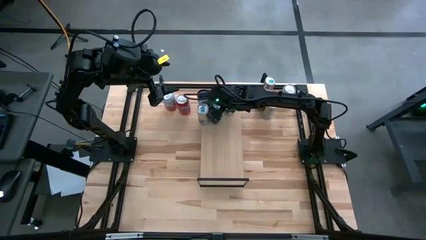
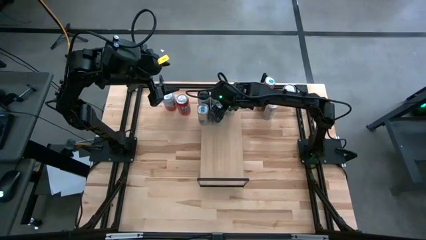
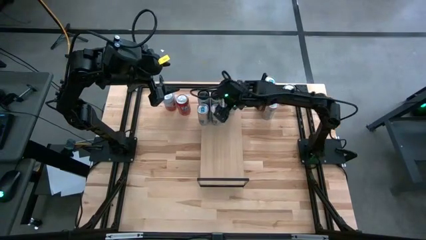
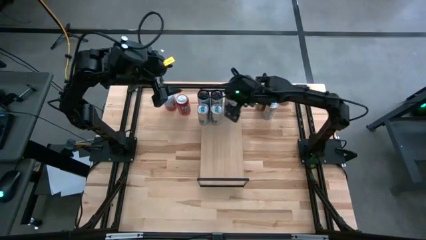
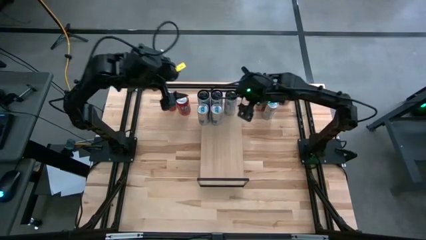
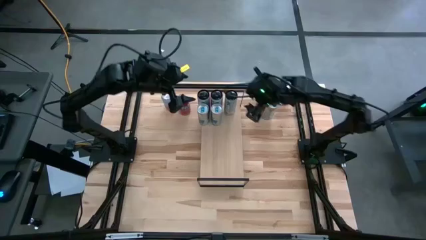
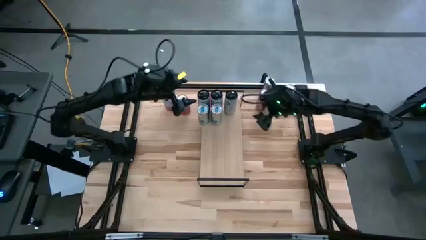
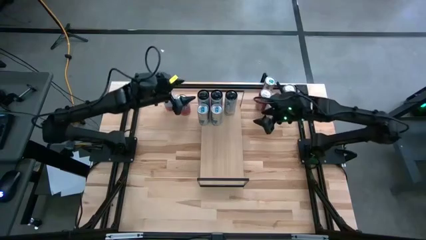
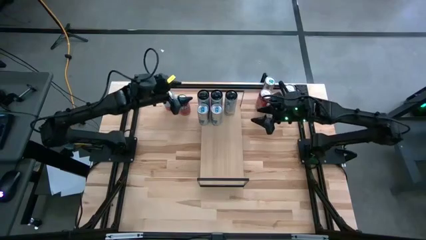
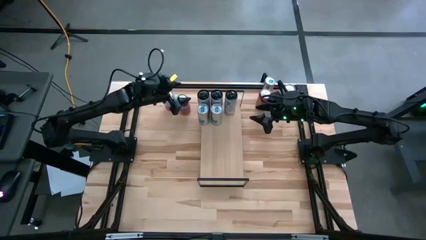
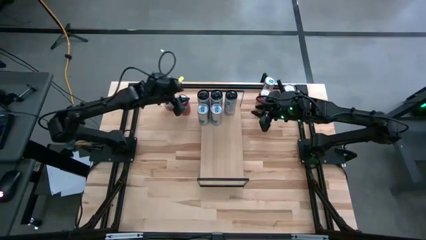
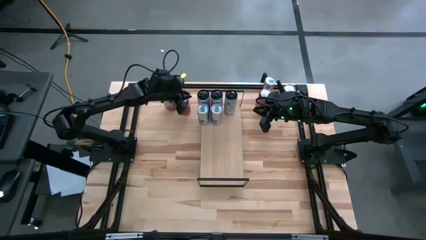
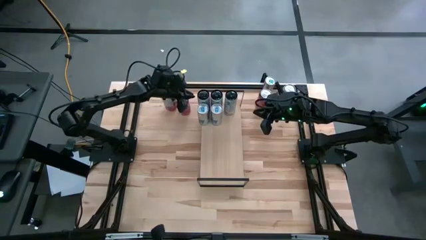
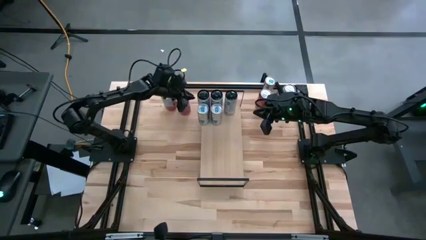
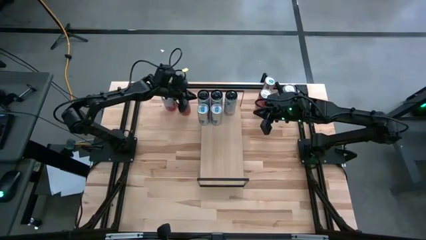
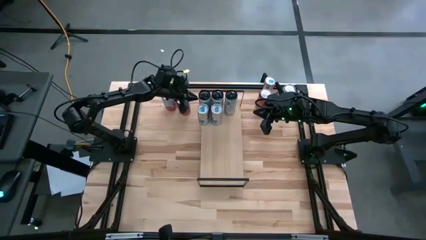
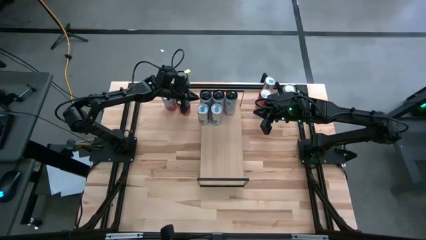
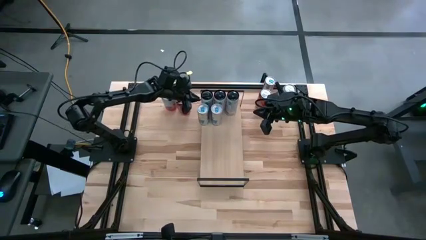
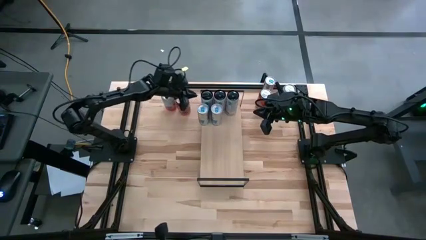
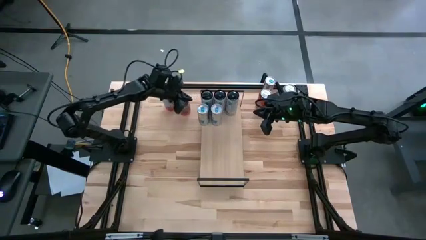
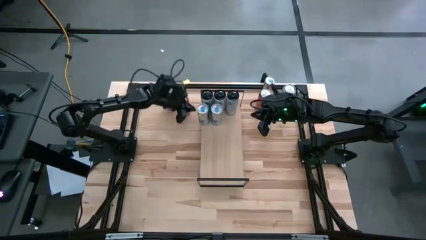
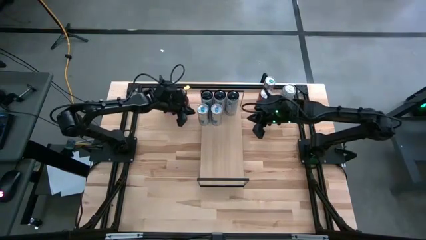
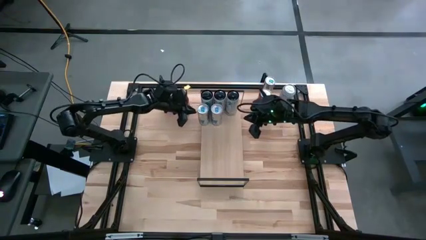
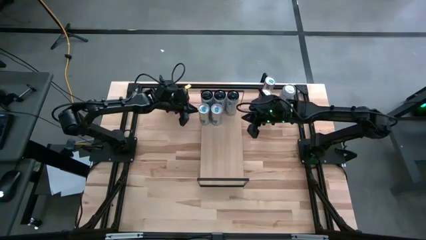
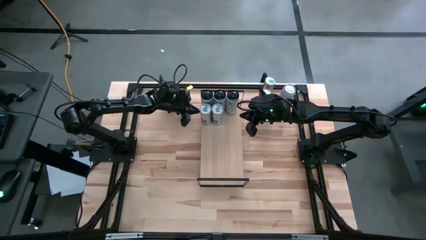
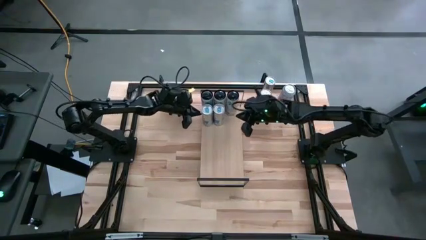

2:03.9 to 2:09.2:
Task: Place canned beverage on shelf
Adjust the soda cans on the shelf

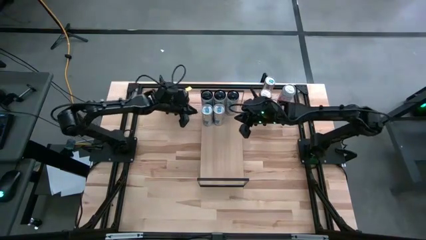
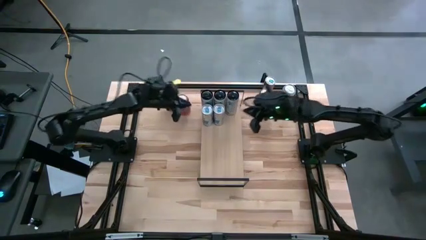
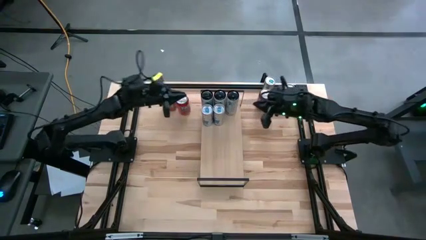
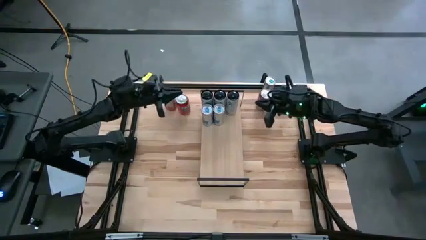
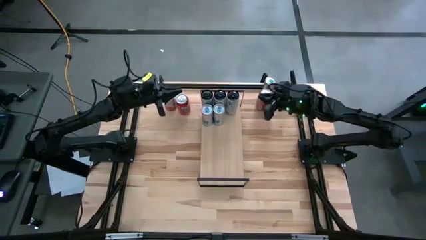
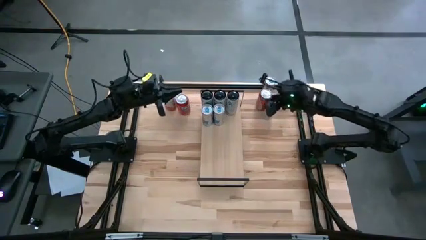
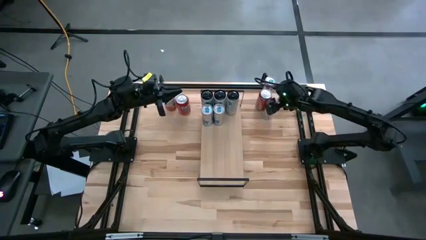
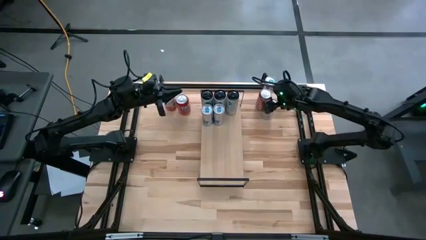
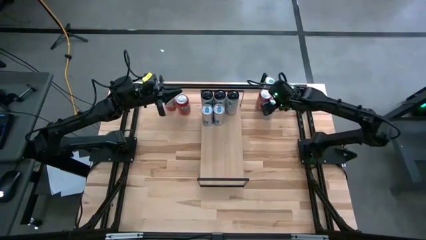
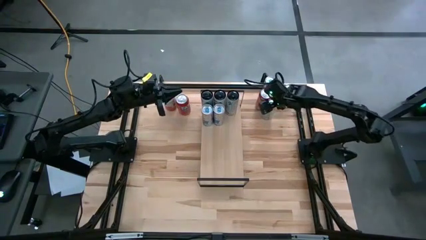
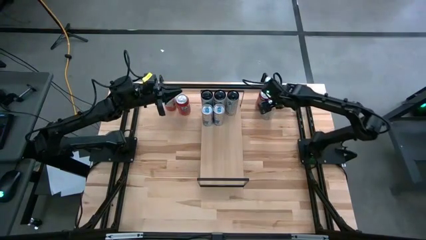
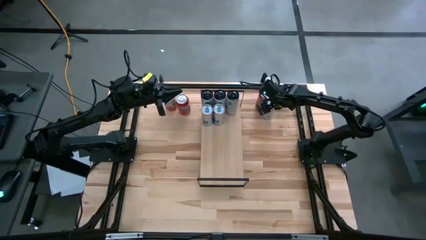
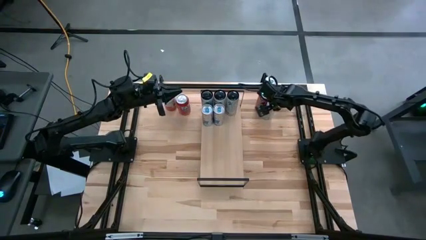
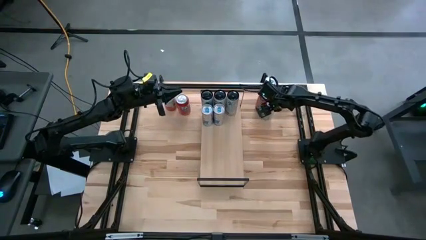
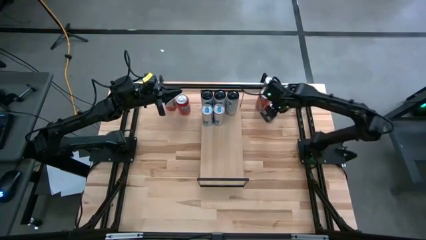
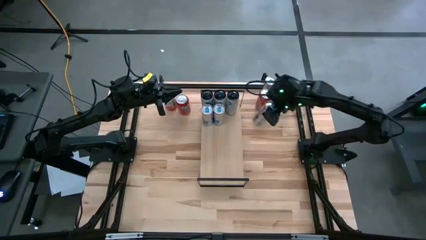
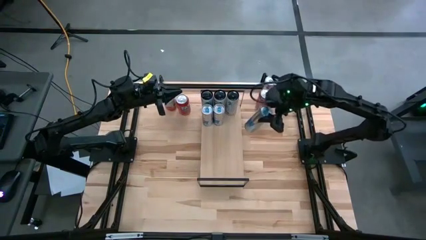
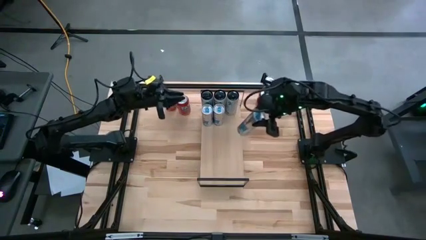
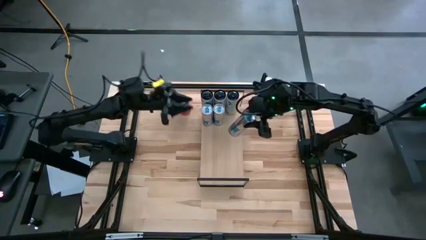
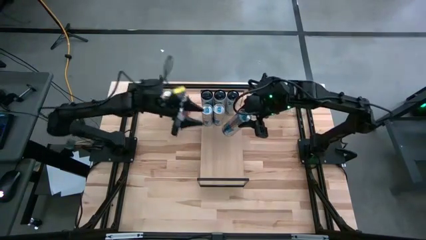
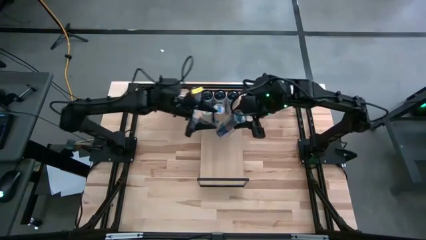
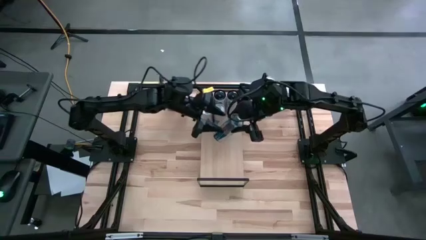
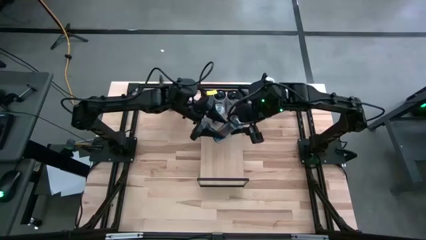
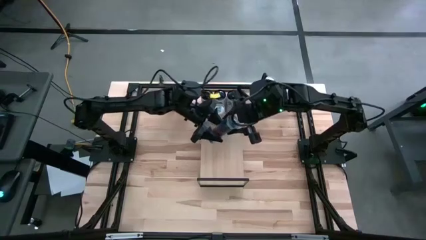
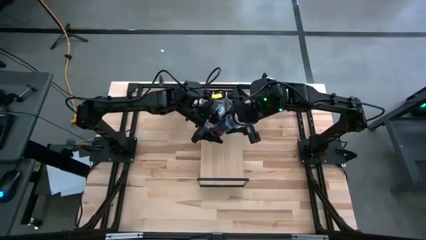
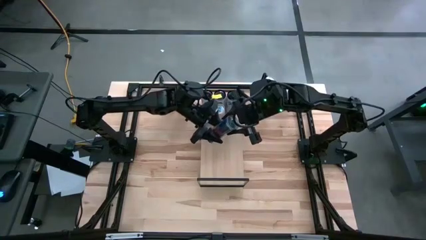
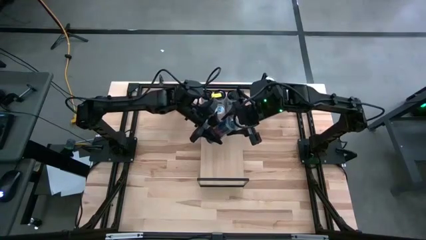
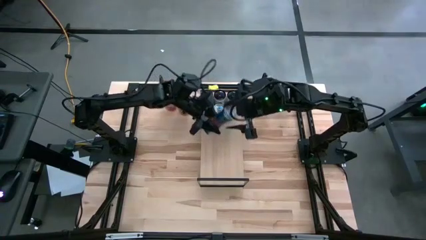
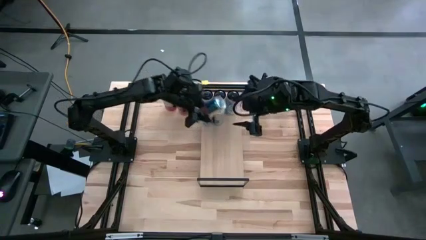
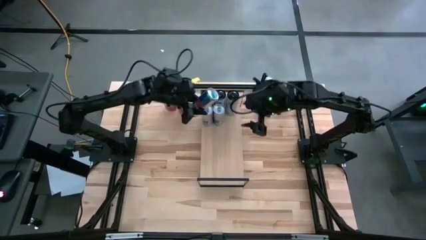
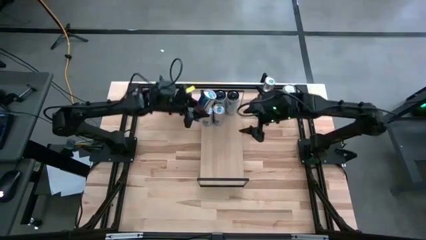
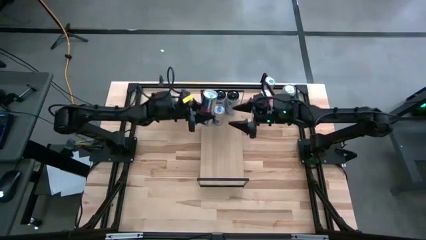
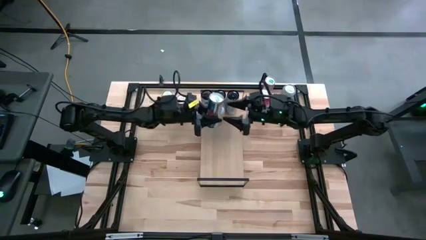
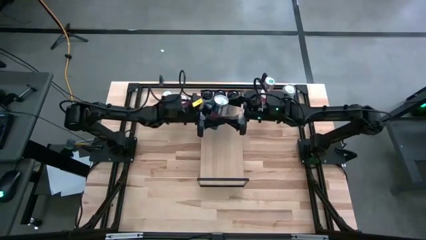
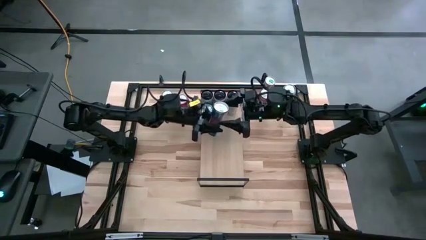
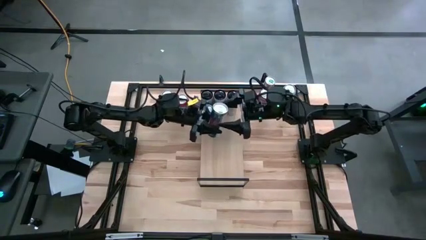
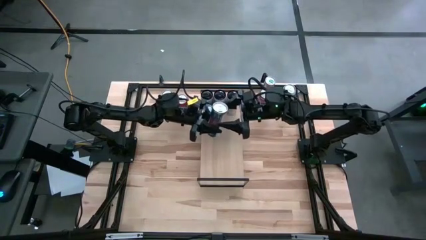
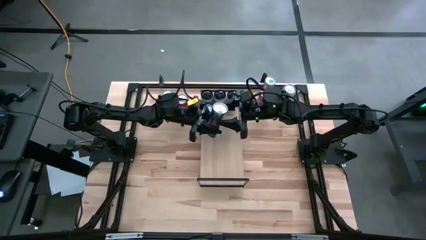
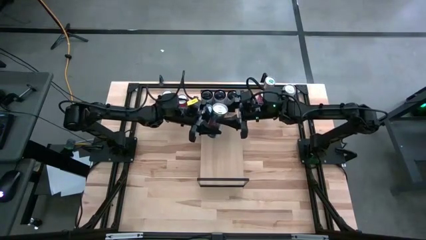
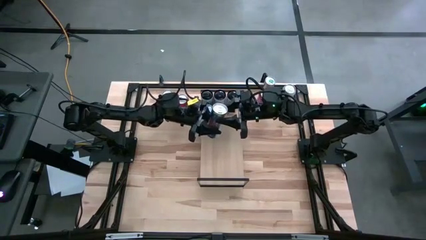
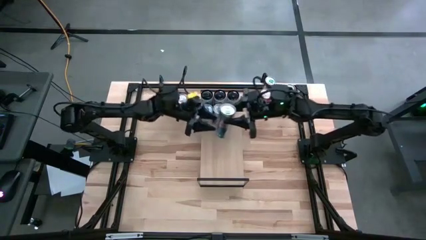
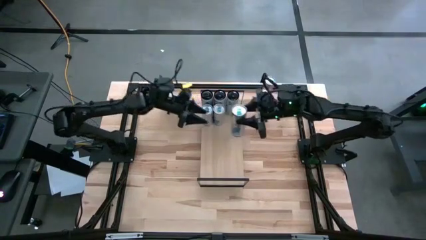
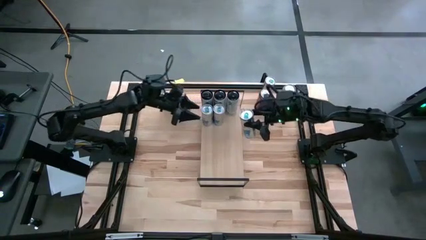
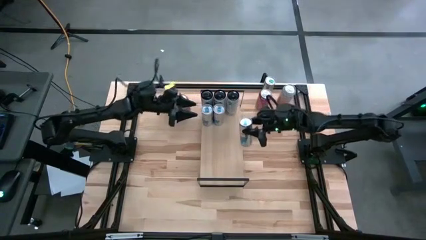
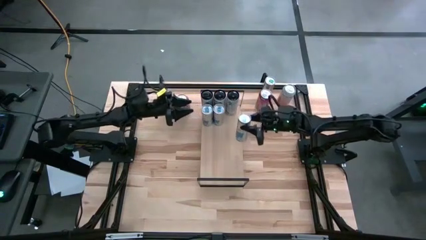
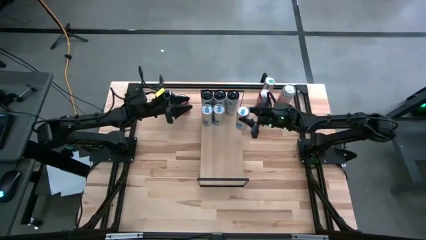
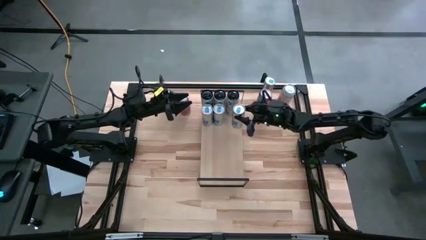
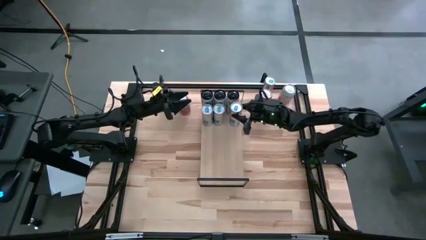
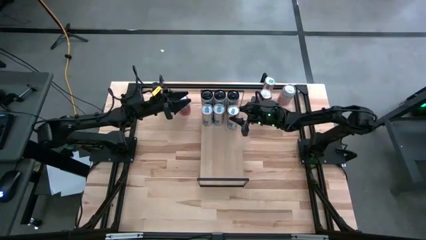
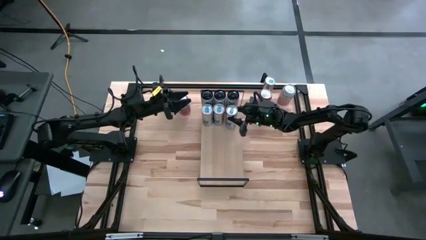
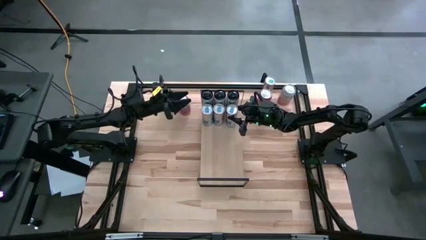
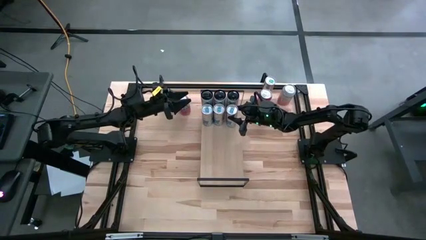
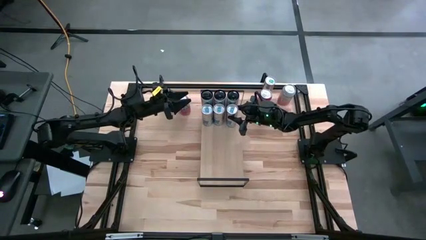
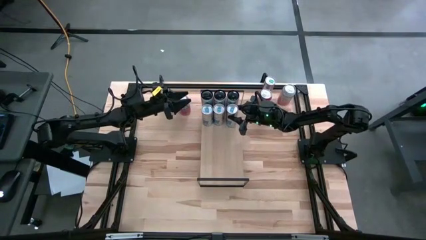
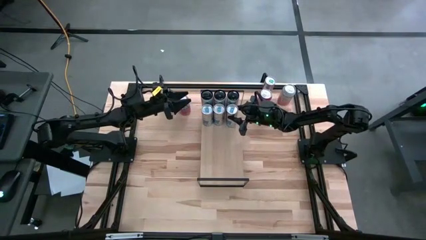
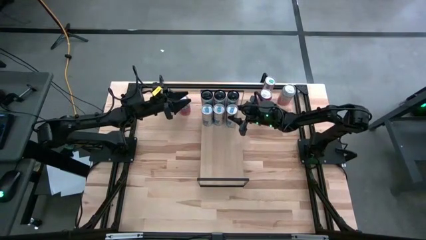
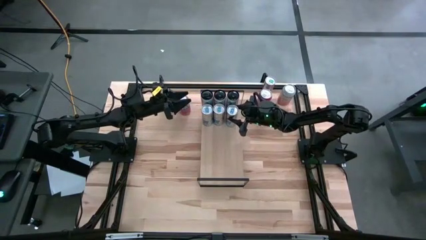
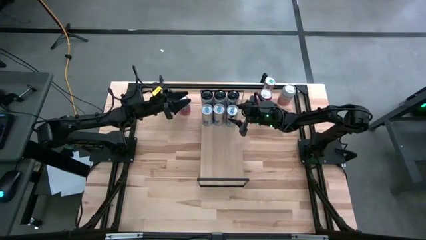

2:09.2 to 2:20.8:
Put the bottom blue soda can on the shelf aligned with the other blue soda can

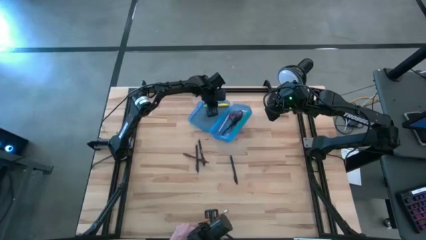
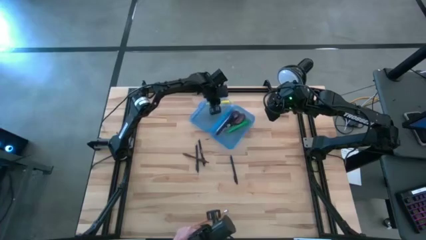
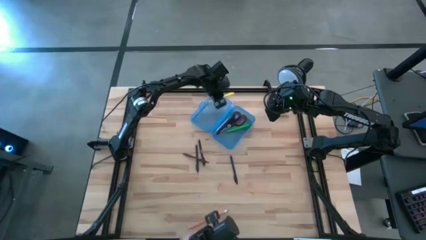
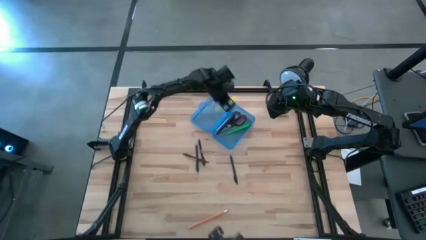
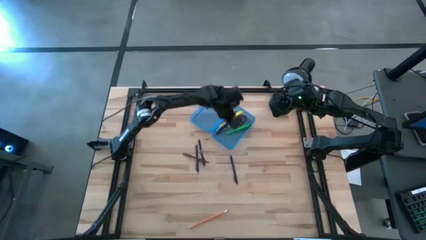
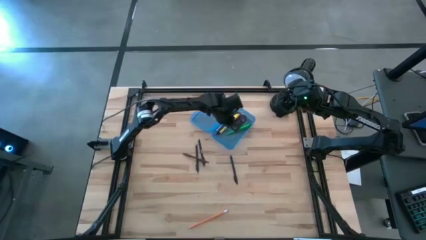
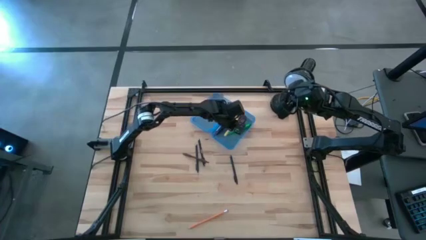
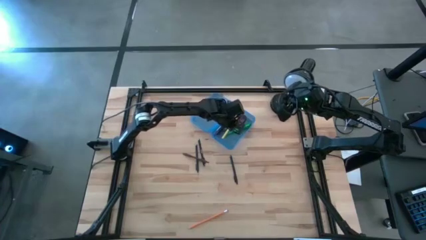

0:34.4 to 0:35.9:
Task: Pick & place school supplies into a supply box
Put the yellow pen into the blue supply box
